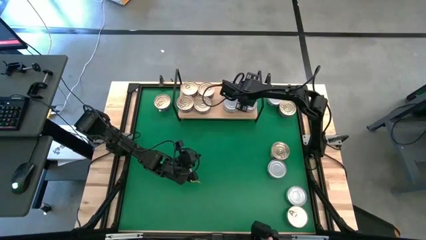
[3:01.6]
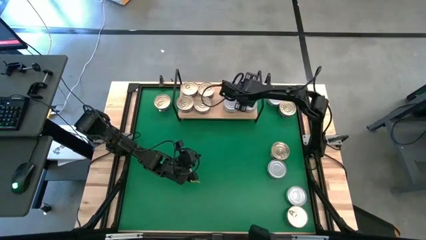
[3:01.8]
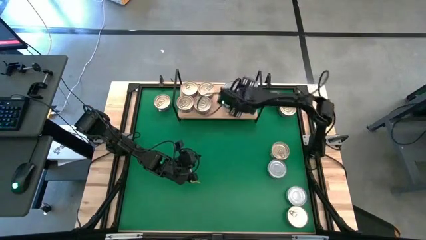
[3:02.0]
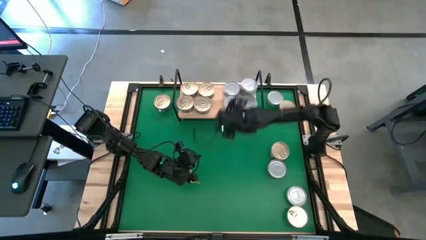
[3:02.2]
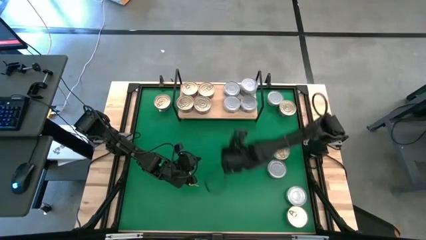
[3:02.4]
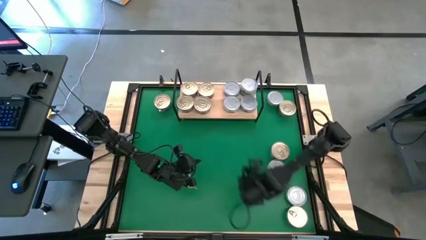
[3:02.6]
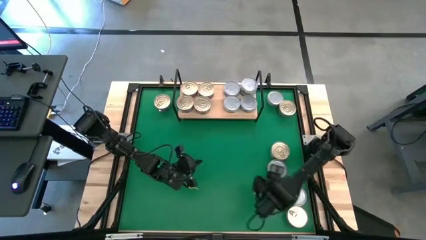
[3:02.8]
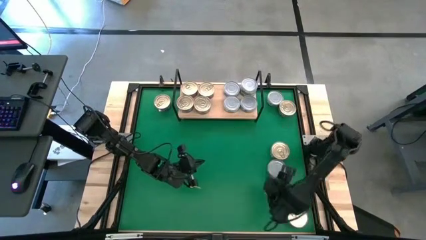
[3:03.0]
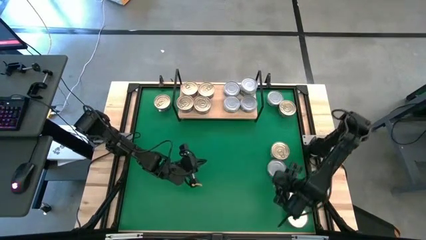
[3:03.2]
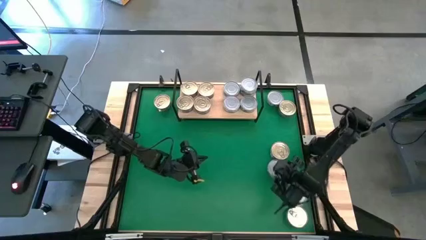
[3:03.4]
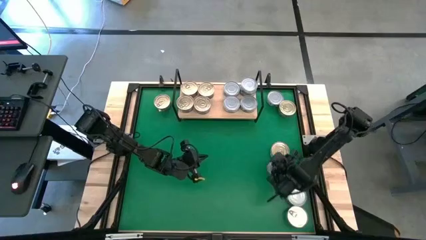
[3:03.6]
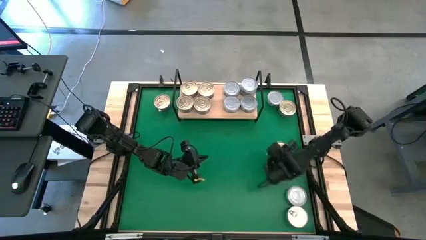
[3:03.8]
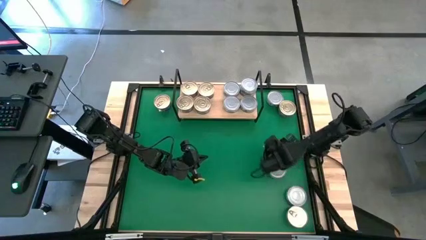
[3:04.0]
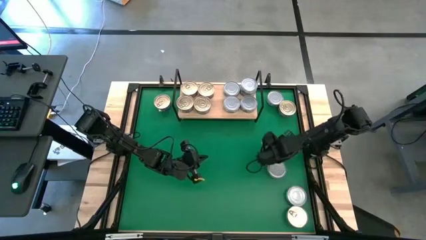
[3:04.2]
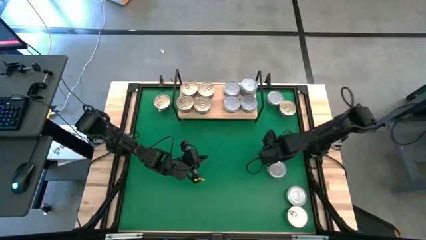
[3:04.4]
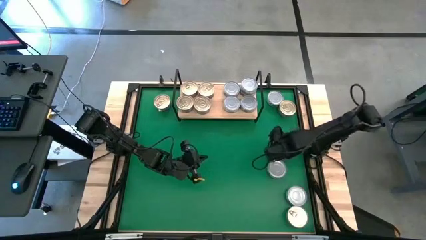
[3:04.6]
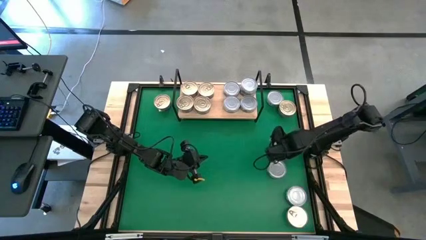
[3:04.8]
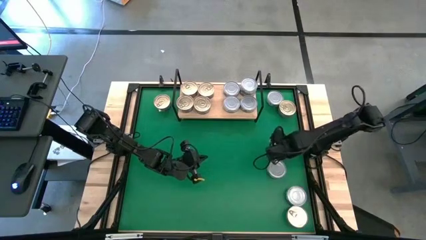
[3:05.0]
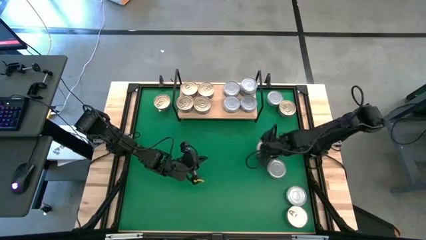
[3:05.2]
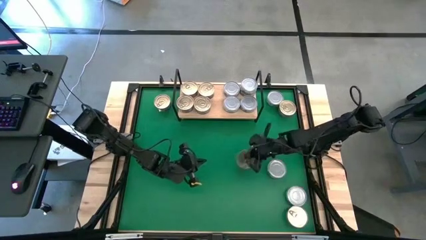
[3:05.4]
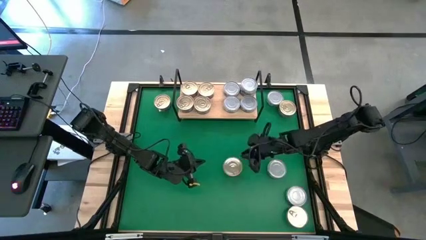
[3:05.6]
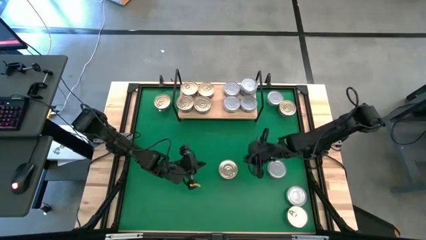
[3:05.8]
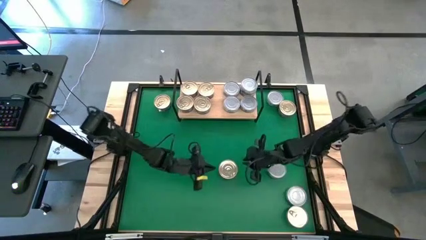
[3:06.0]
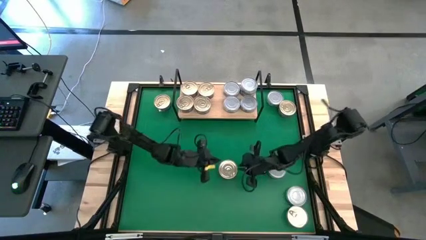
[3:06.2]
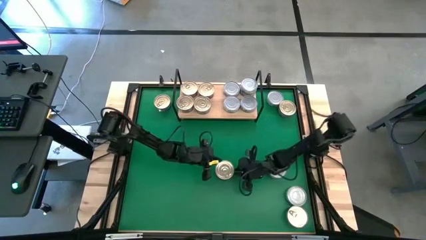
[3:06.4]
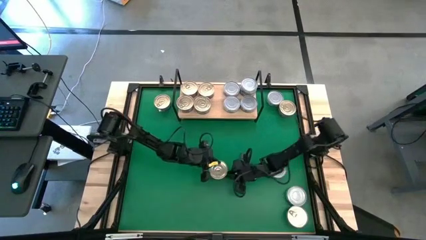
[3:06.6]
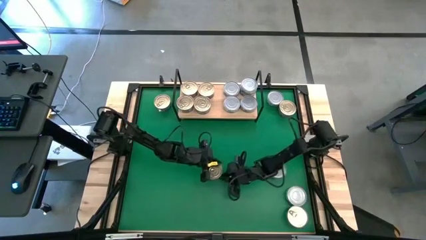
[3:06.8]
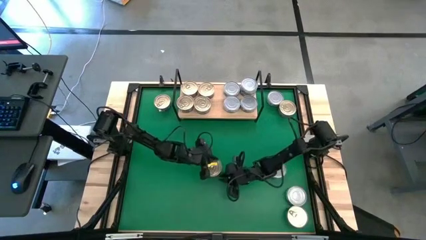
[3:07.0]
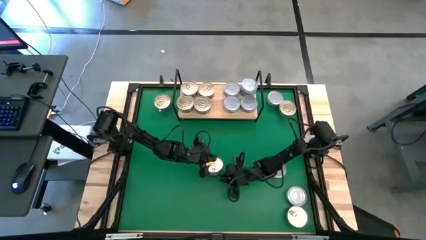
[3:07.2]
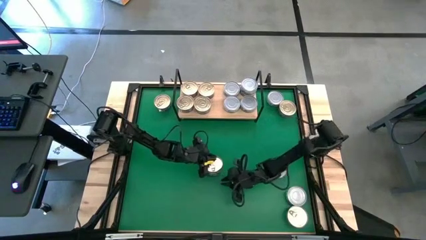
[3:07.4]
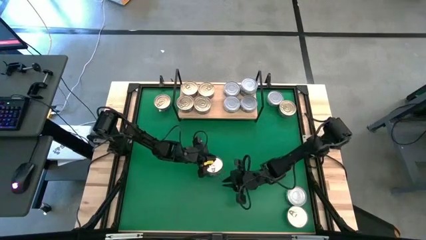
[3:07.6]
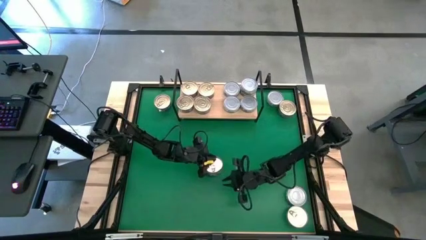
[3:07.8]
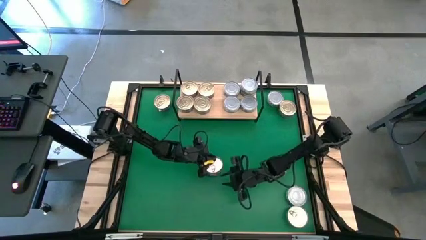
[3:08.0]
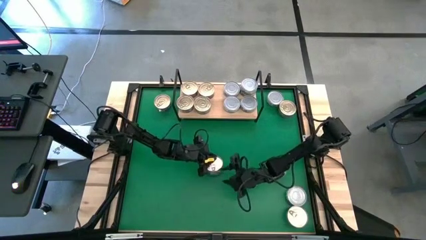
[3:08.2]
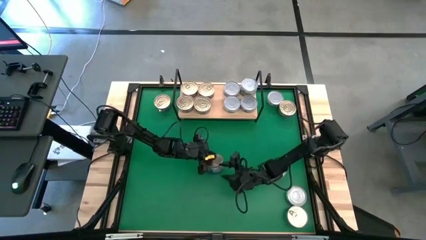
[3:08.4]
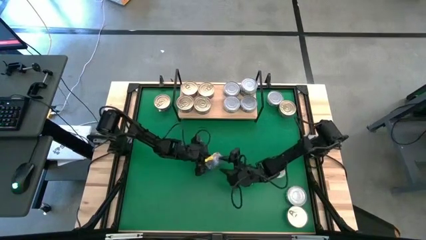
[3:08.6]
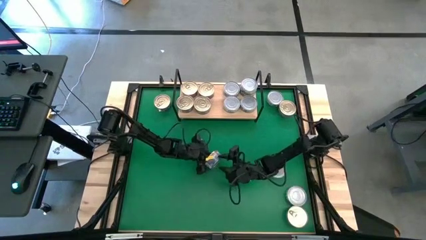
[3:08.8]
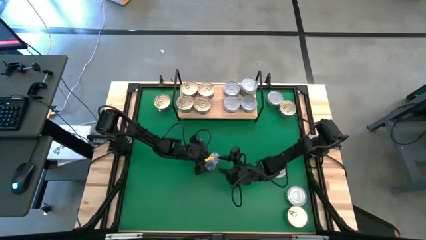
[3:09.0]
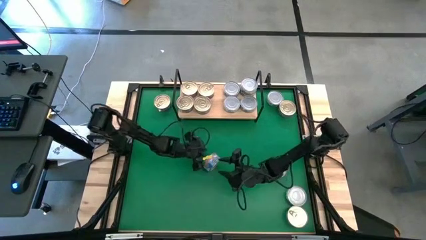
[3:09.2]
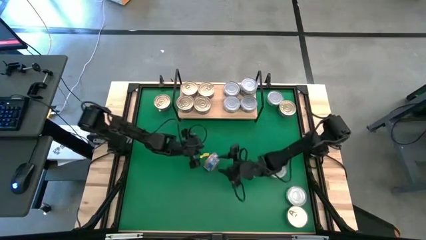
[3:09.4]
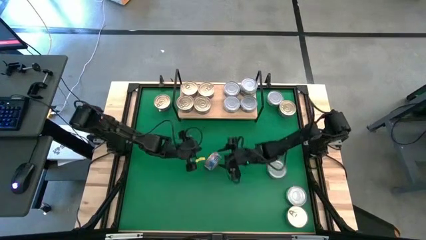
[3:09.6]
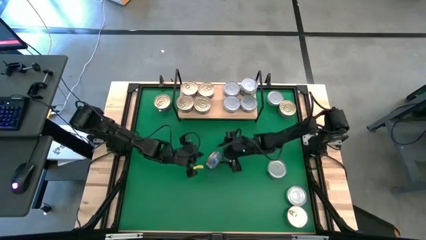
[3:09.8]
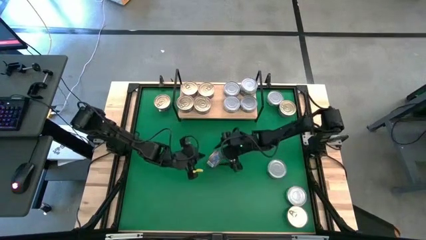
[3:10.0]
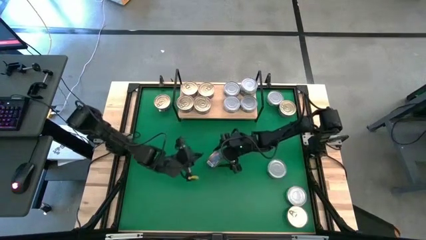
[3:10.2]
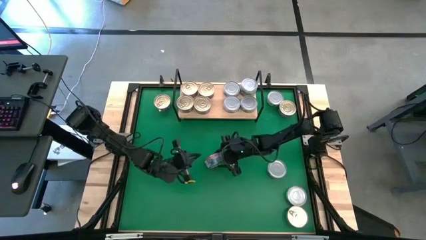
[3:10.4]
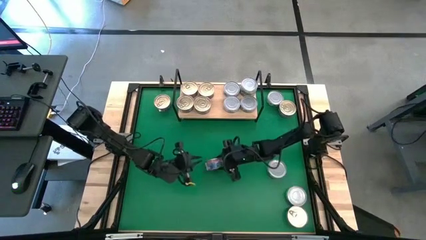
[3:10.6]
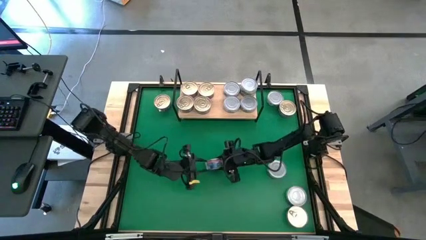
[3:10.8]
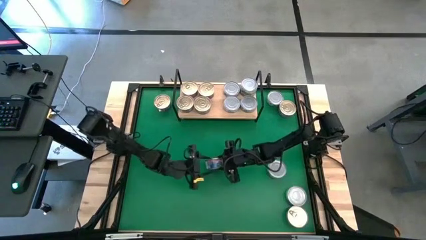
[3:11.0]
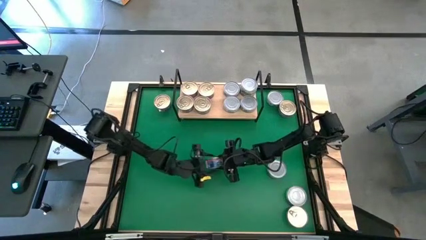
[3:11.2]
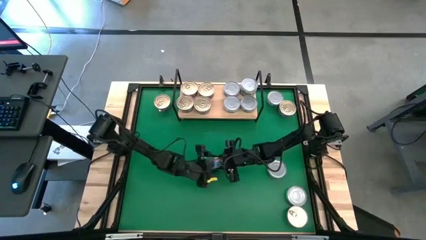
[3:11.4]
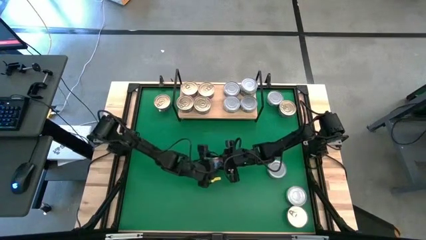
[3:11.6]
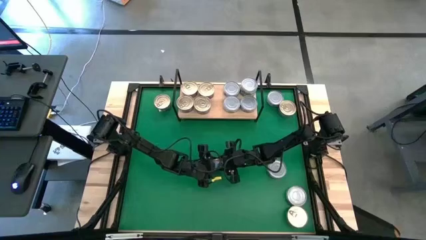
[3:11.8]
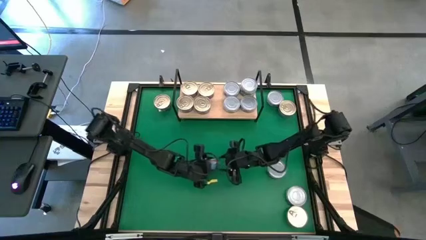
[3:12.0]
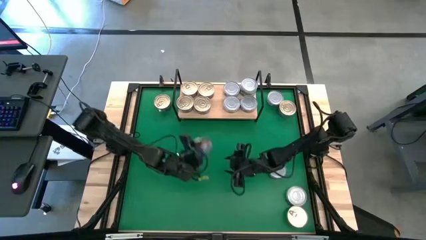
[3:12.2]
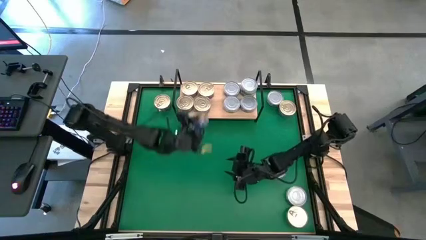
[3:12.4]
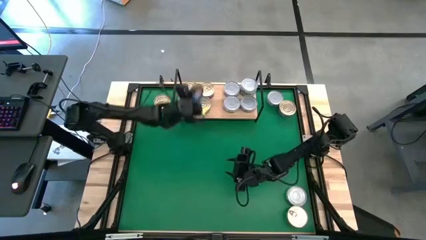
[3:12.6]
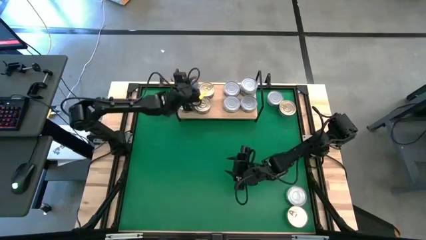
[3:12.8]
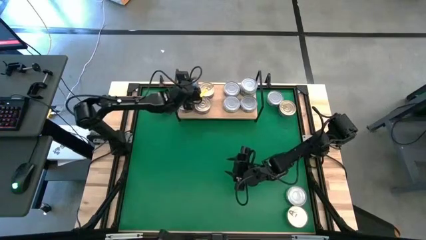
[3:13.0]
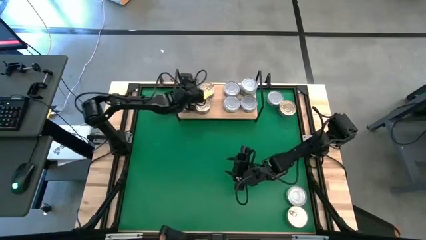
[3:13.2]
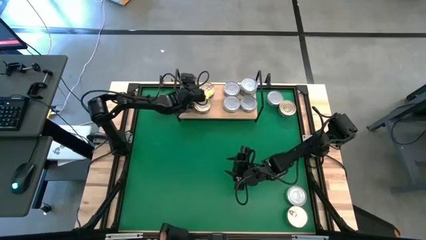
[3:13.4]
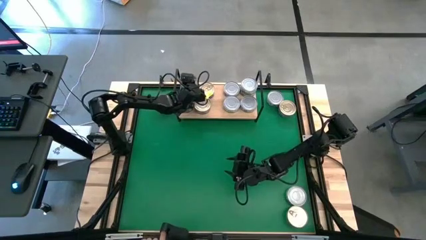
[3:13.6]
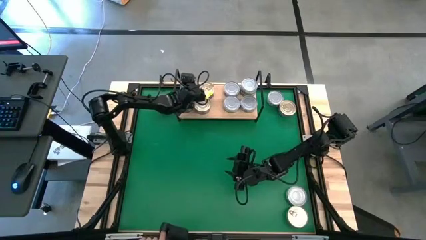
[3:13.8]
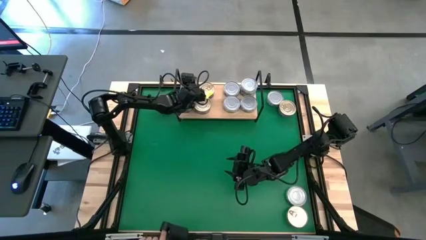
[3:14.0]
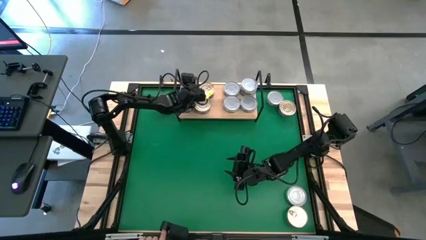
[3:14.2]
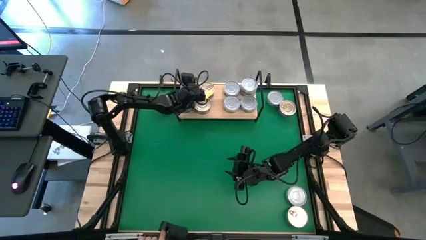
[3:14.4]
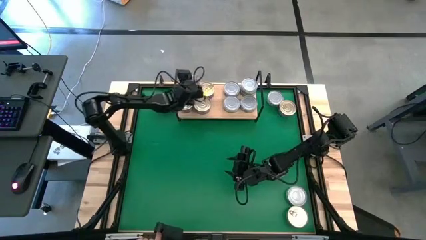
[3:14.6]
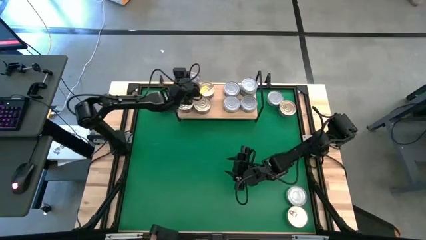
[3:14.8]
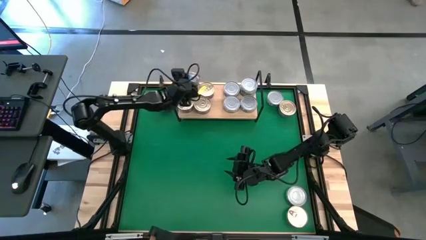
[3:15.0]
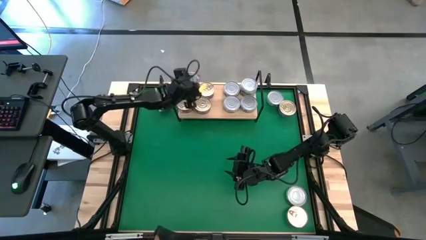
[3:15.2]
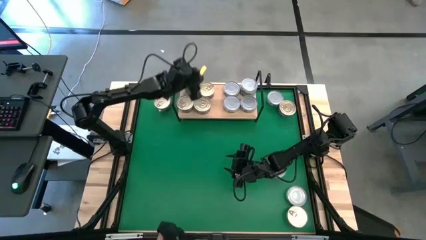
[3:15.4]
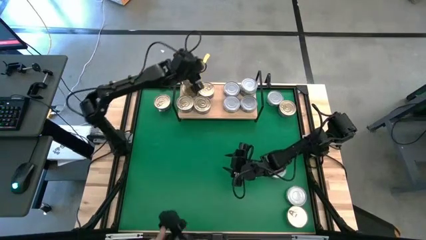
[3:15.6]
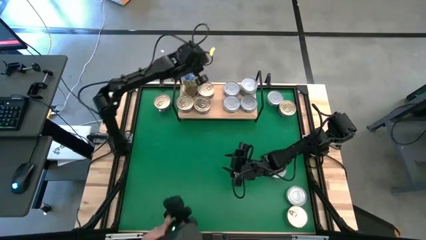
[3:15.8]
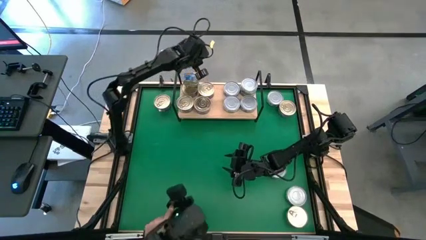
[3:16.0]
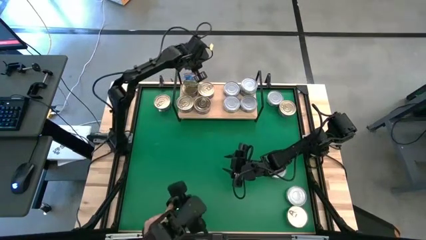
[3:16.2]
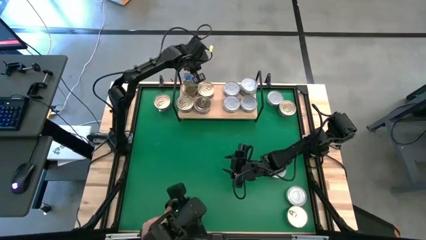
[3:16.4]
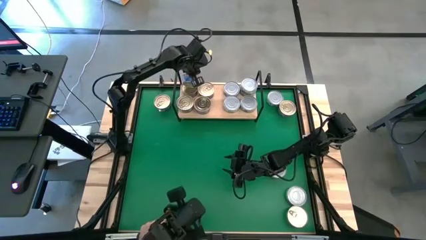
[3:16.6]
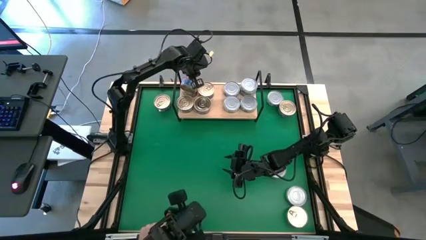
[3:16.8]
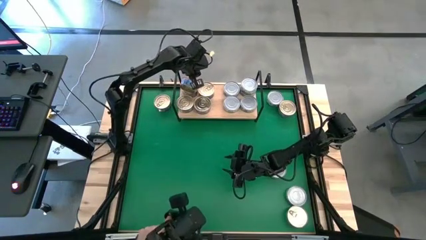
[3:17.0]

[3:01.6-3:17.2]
Task: Stack canned seafood by type on shelf
Stack the blue pink tuna can on top of the other blue pink tuna can on the shelf
